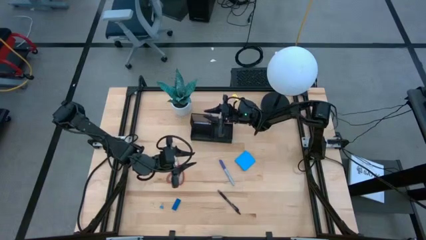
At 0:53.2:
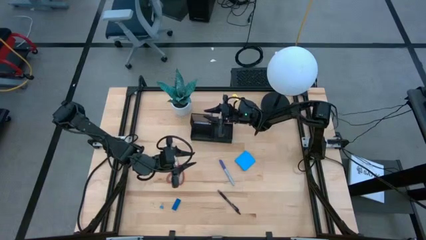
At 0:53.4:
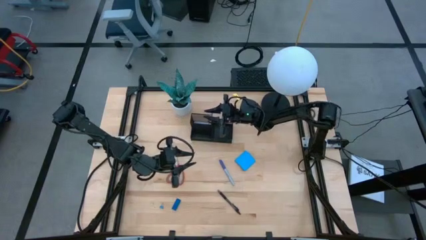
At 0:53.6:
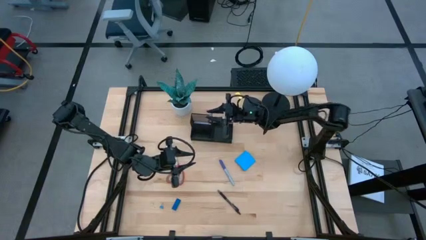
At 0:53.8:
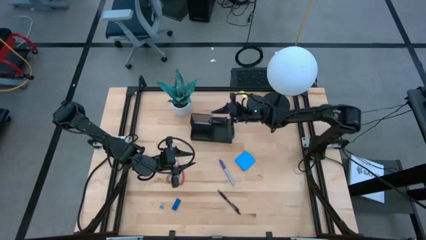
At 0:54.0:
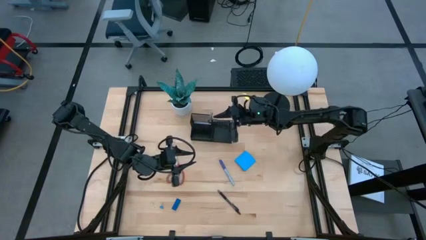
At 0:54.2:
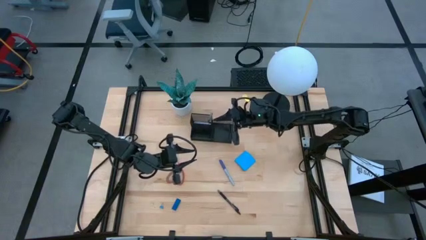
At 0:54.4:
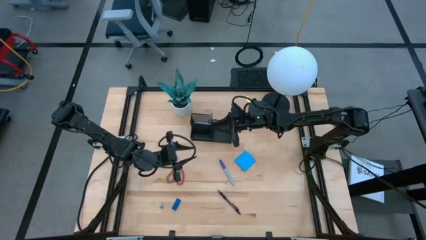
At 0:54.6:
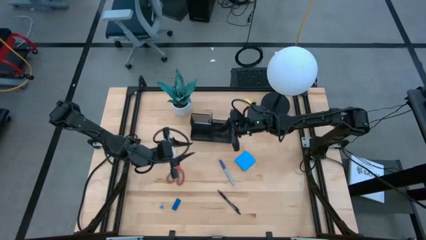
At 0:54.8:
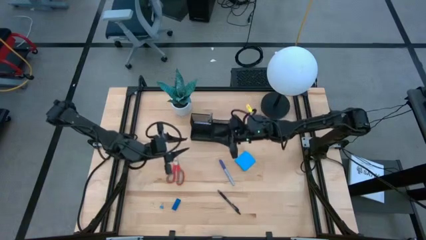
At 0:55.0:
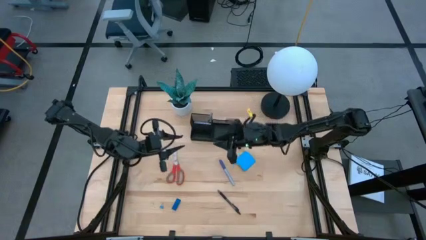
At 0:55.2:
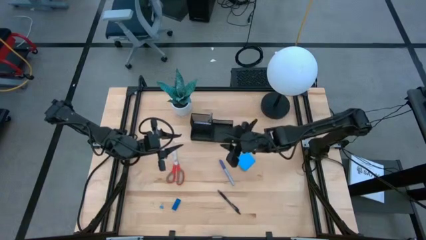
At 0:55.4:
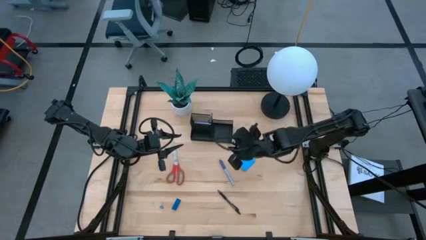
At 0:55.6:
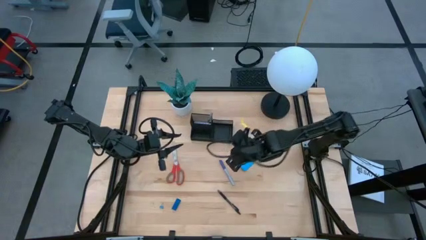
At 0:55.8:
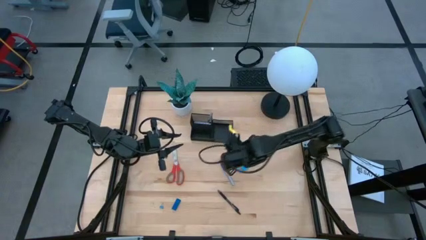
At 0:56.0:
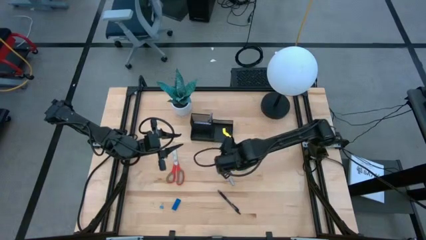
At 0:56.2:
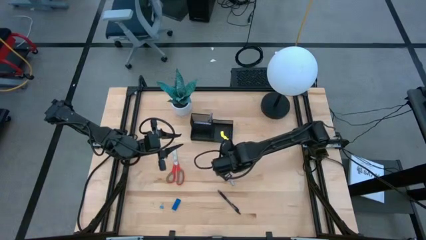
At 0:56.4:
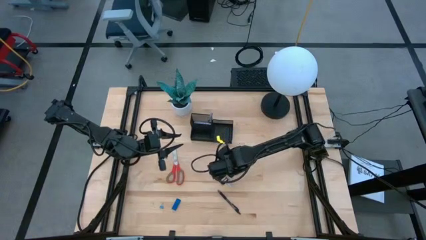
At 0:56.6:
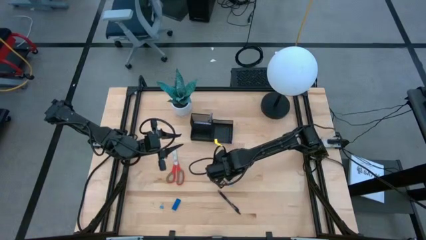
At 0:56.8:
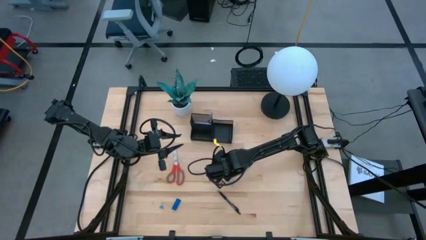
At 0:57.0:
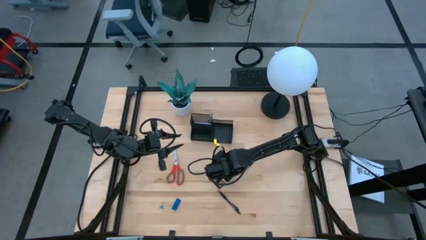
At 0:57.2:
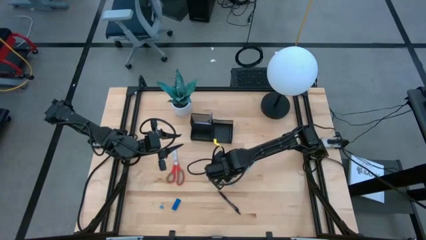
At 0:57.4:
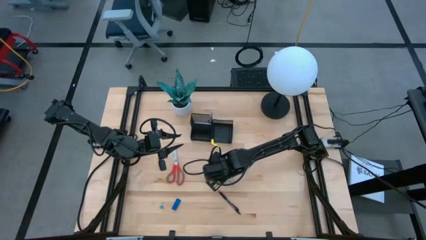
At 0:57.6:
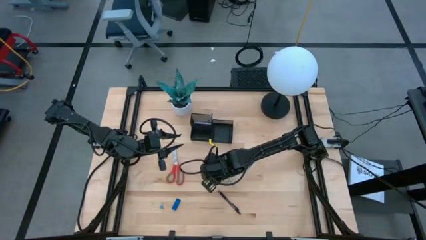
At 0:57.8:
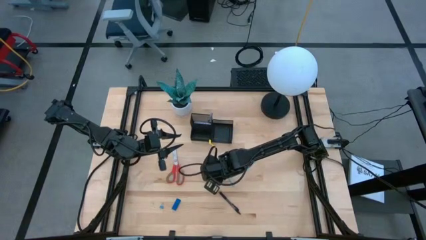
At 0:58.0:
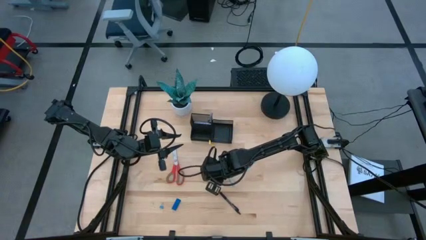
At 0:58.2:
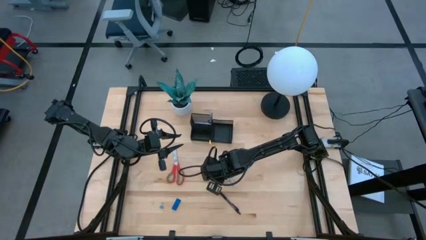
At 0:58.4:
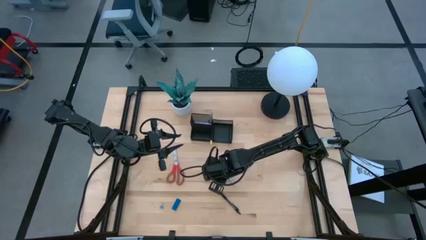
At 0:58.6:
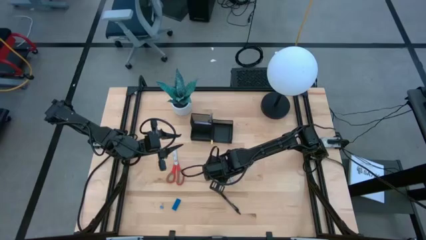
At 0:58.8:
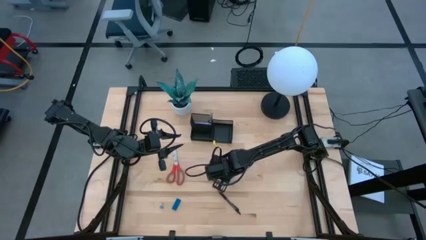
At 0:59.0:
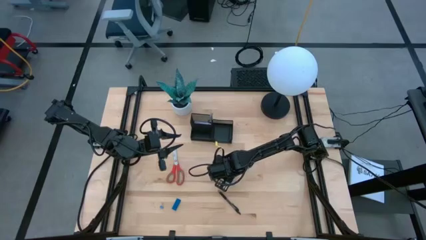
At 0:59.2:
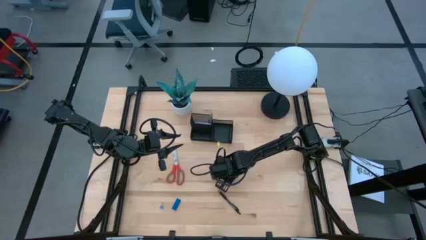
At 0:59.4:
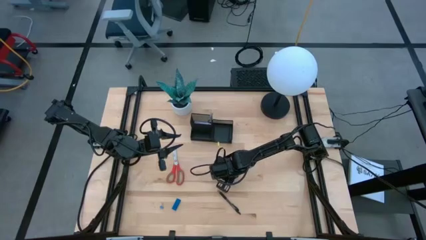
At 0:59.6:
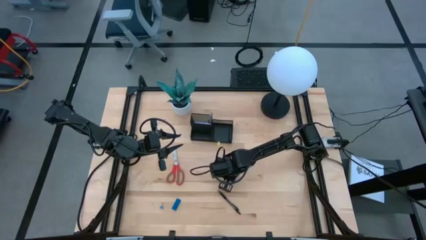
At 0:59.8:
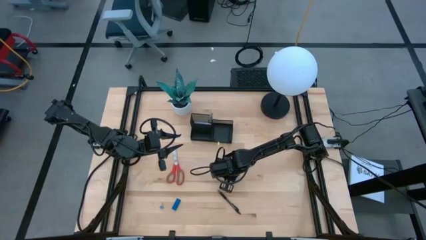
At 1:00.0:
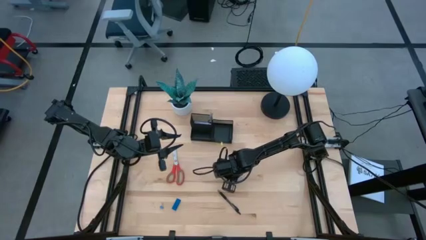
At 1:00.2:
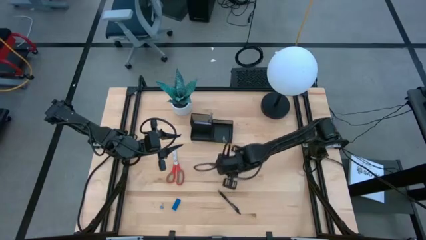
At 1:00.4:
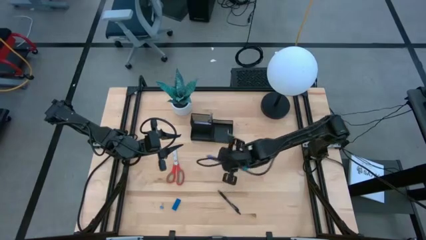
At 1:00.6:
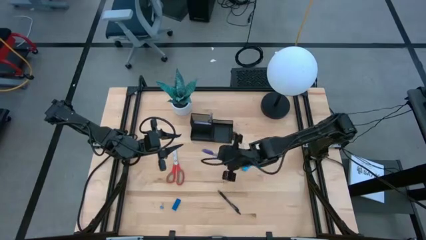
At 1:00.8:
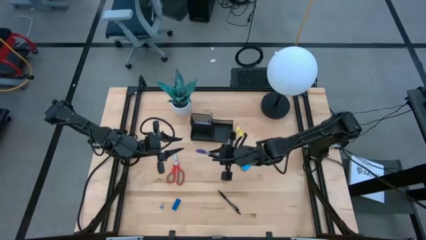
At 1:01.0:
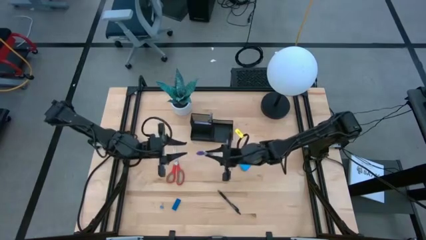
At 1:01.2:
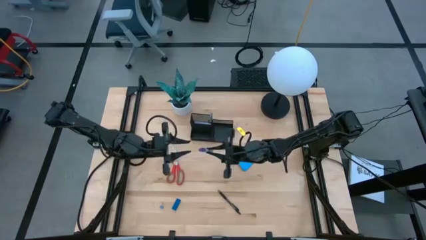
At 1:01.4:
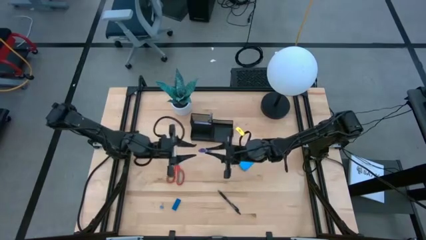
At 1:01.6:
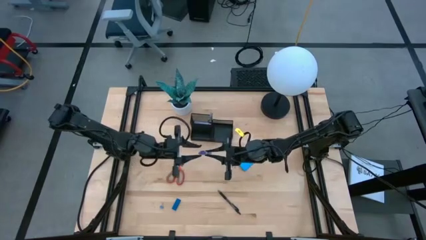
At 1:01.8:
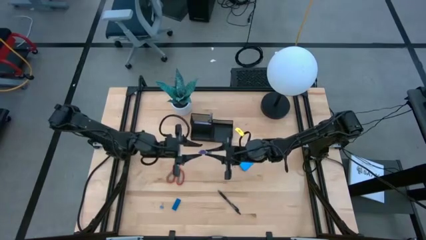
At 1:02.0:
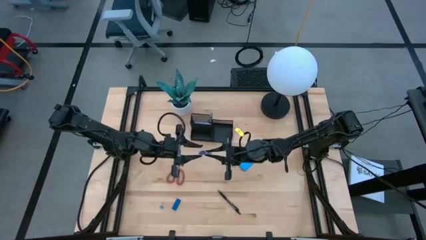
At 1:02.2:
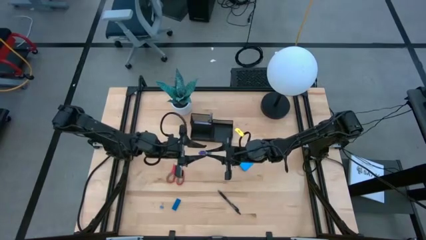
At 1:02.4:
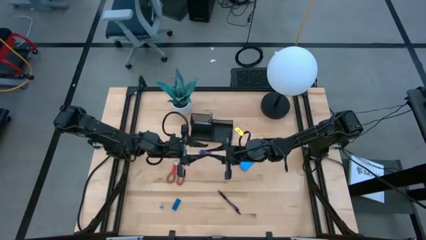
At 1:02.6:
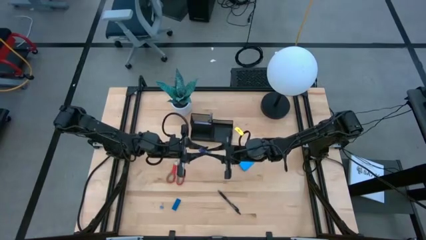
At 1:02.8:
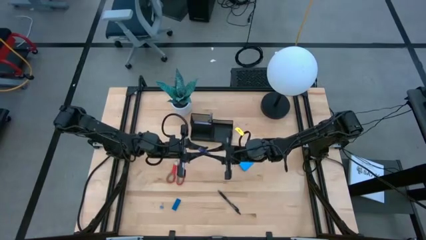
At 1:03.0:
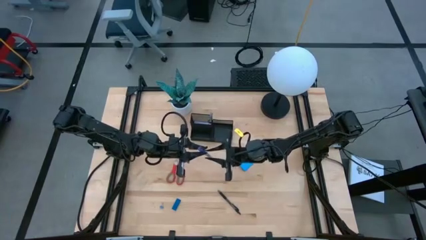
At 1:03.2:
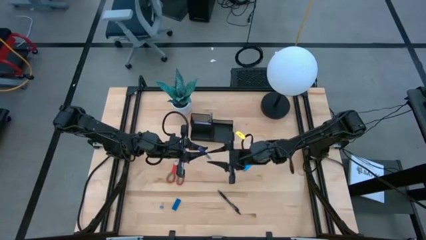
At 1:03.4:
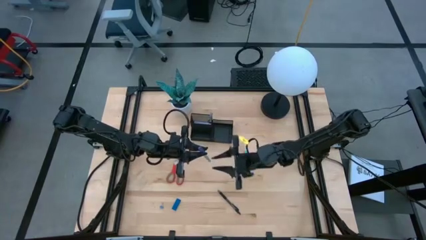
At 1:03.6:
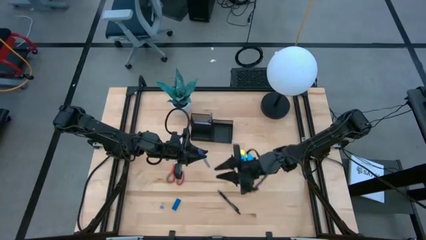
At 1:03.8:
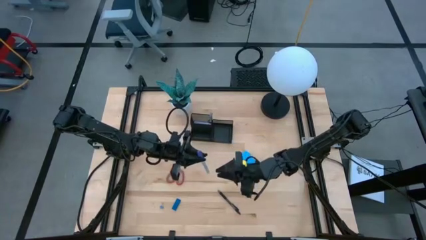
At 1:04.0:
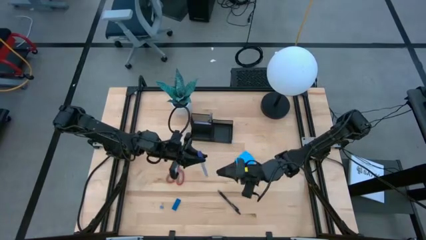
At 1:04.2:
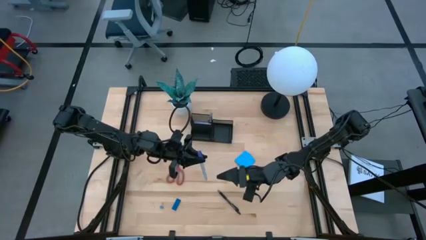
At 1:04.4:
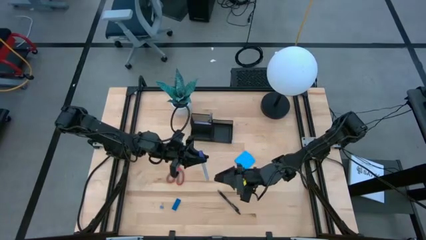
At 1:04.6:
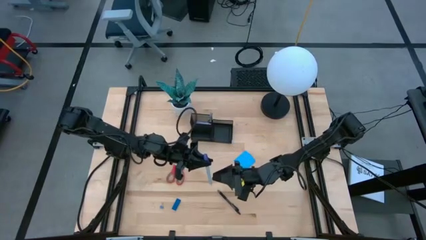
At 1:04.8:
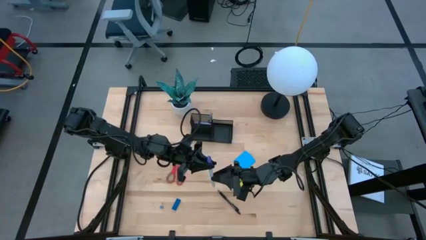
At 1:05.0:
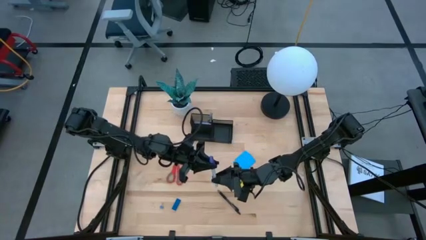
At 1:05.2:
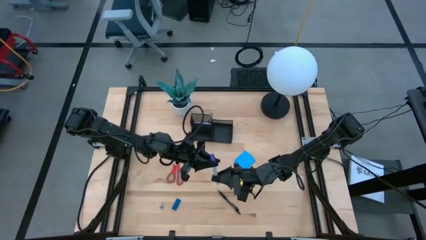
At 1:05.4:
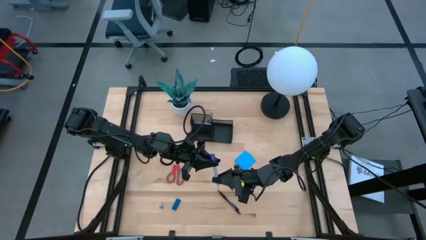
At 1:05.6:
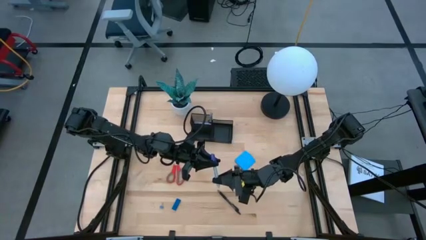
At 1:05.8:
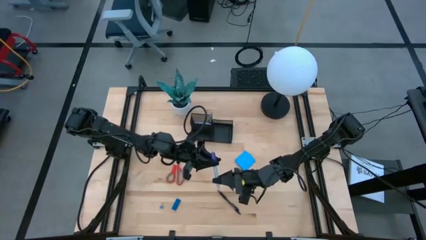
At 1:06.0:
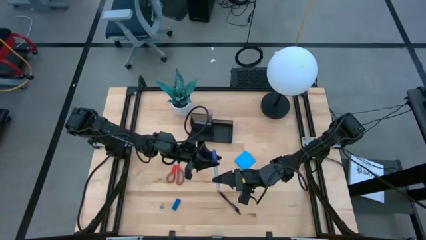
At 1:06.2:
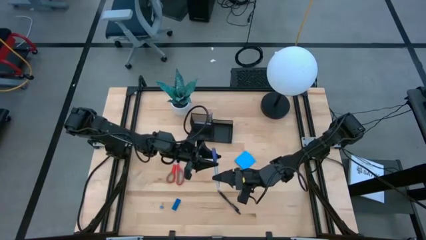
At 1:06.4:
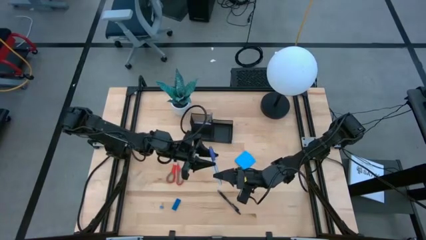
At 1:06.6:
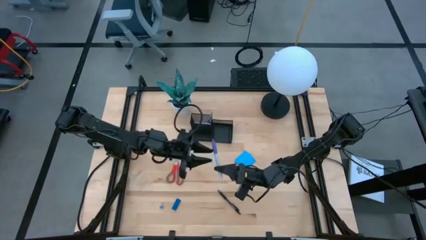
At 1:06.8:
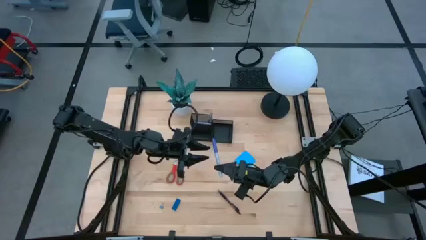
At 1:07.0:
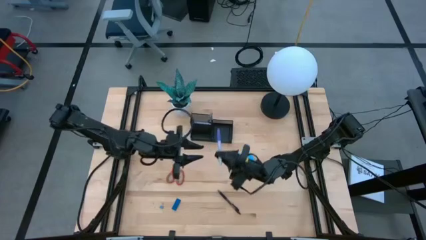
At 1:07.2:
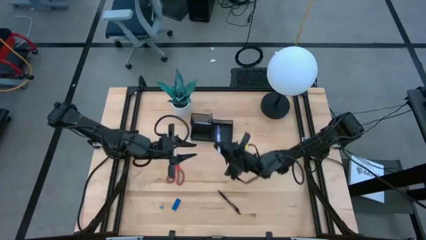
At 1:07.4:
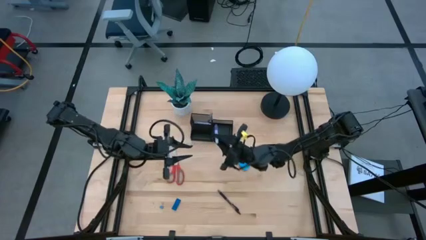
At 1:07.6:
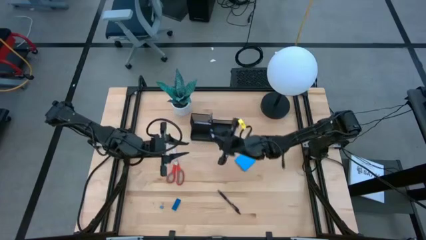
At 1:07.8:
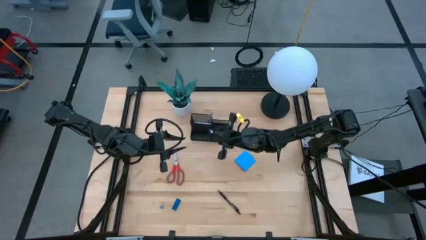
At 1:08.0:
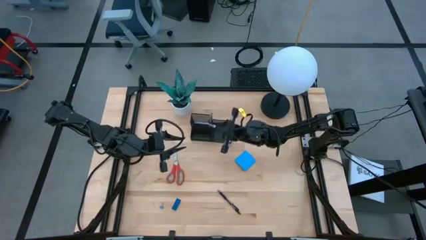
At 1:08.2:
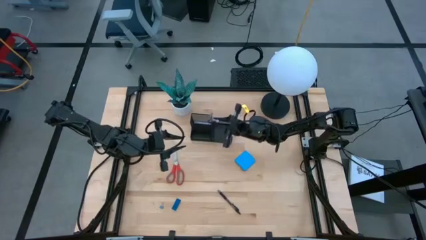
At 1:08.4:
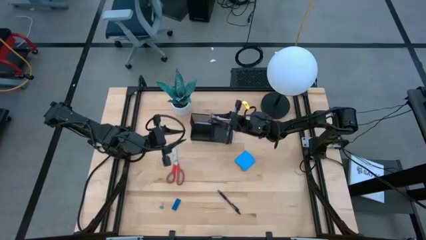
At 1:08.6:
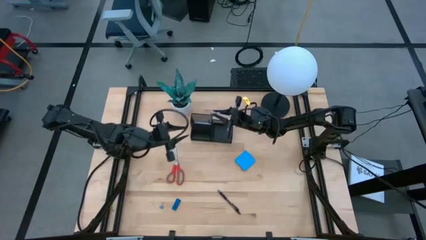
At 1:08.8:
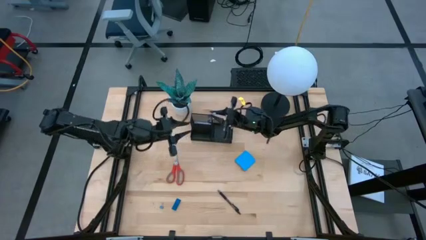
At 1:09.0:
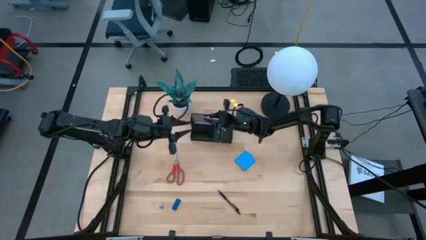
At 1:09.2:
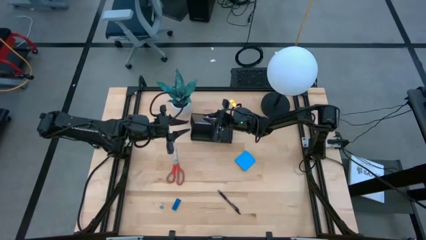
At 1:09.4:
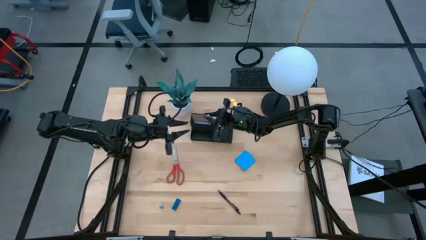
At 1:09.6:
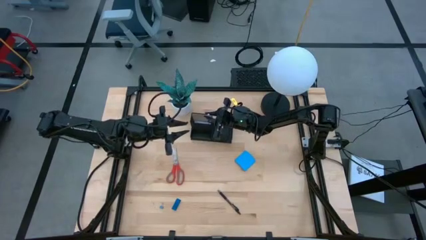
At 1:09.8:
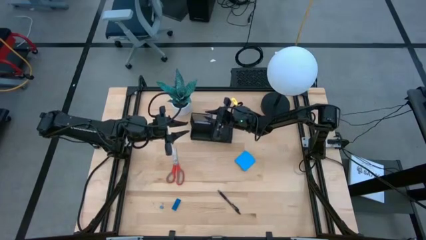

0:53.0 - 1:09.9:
Task: Pick and place office supplies into organizer
Put the blue marker into the black desk organizer
